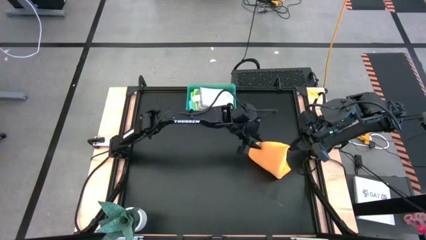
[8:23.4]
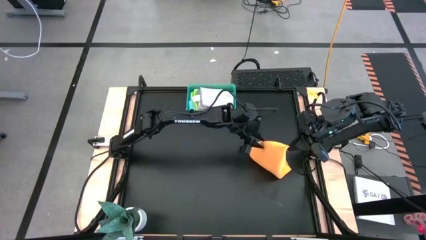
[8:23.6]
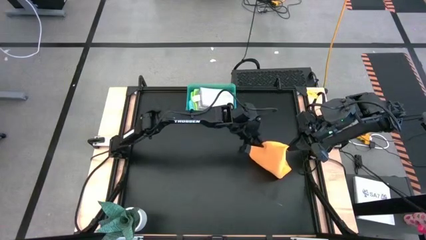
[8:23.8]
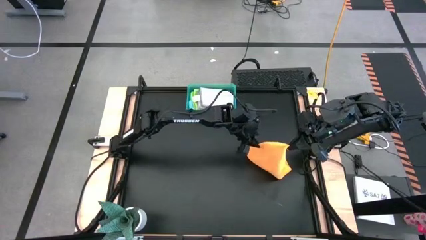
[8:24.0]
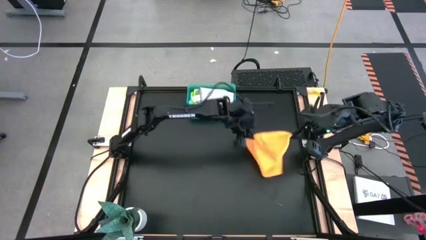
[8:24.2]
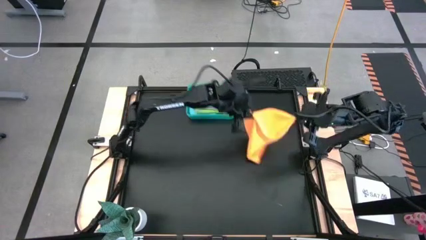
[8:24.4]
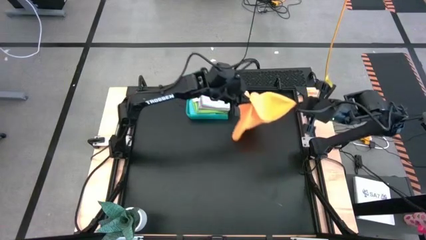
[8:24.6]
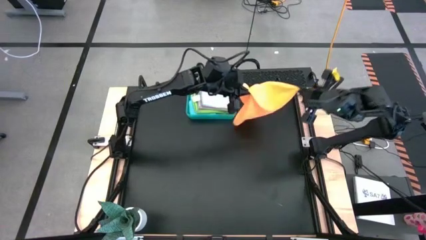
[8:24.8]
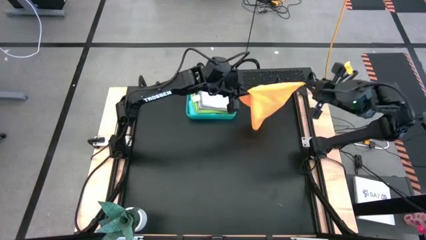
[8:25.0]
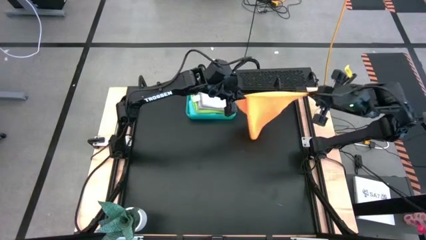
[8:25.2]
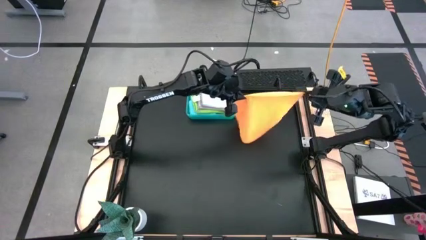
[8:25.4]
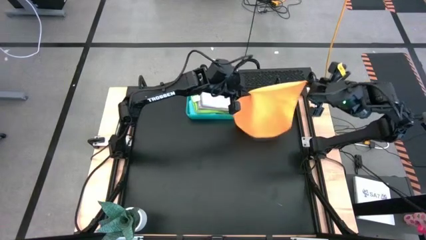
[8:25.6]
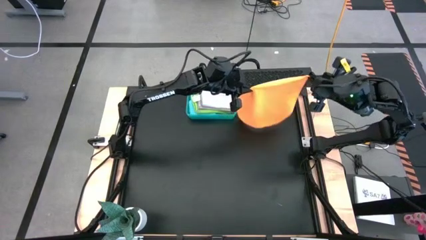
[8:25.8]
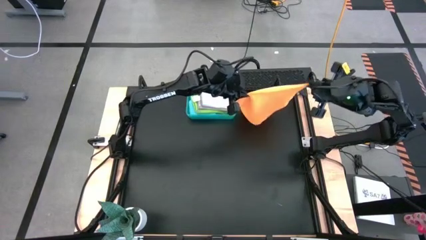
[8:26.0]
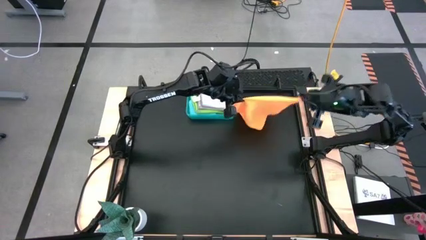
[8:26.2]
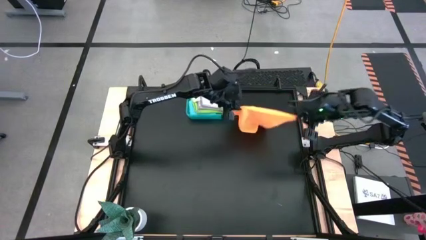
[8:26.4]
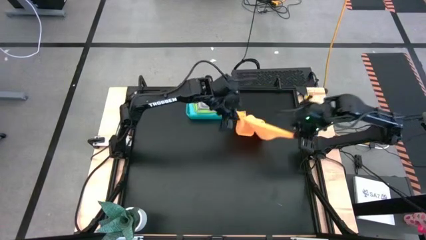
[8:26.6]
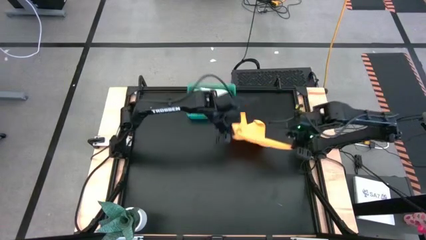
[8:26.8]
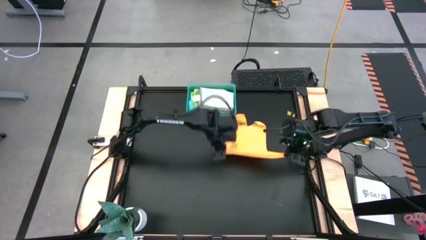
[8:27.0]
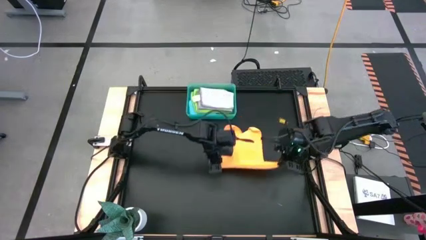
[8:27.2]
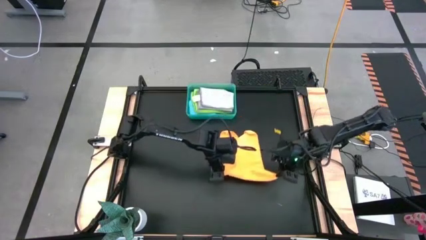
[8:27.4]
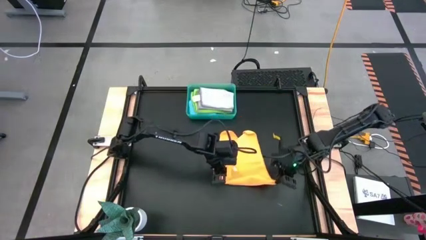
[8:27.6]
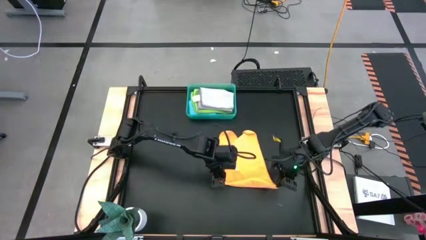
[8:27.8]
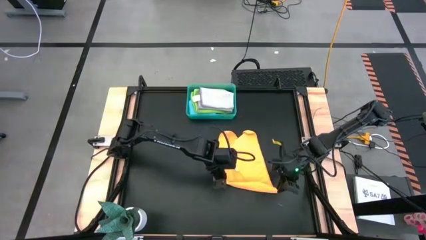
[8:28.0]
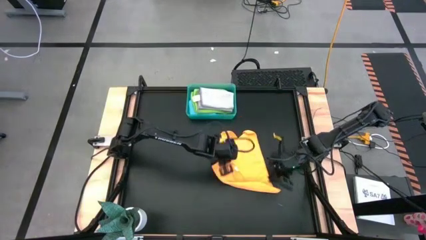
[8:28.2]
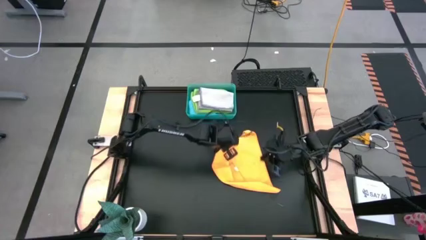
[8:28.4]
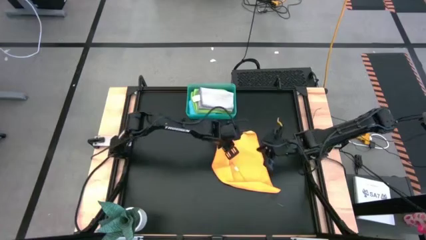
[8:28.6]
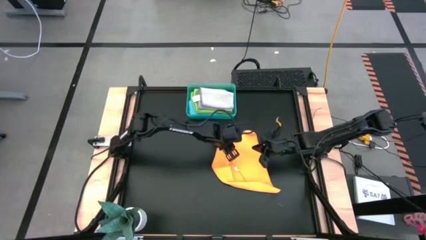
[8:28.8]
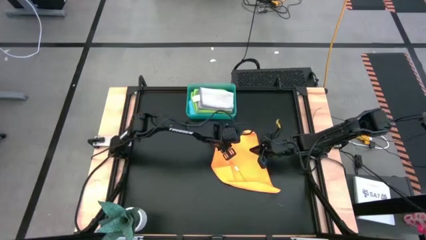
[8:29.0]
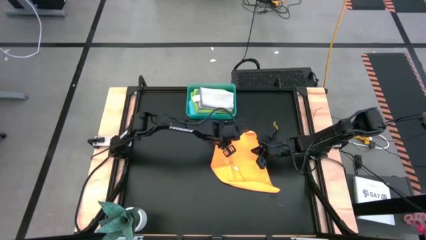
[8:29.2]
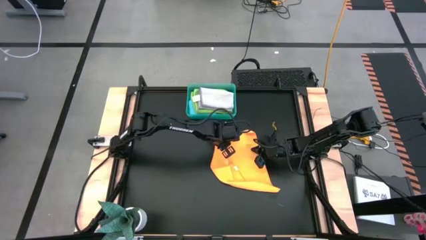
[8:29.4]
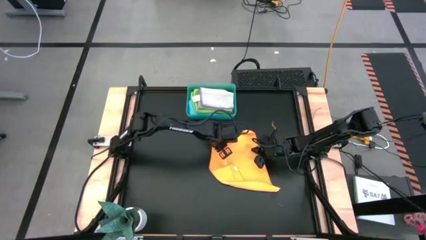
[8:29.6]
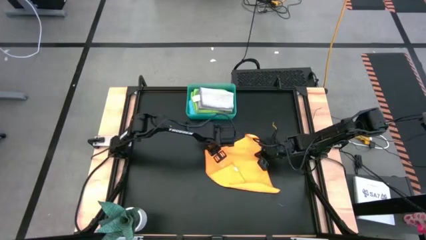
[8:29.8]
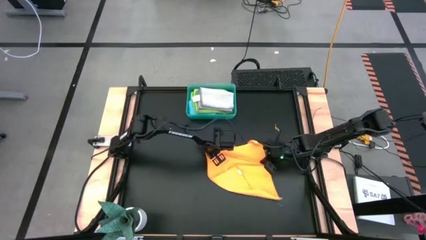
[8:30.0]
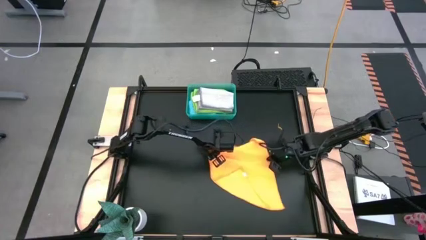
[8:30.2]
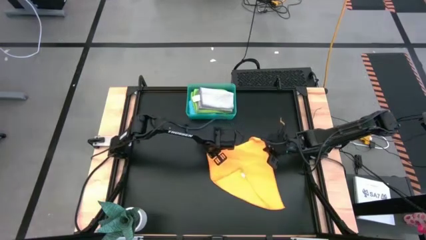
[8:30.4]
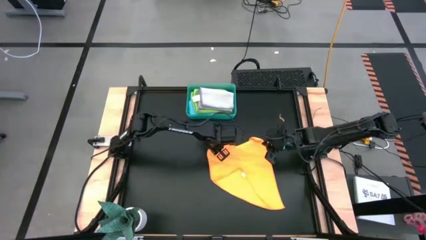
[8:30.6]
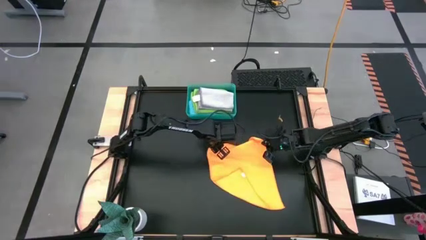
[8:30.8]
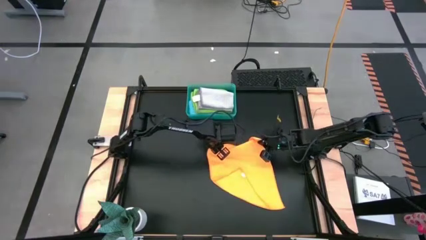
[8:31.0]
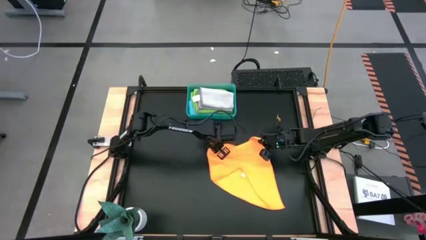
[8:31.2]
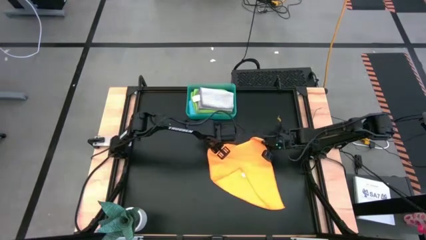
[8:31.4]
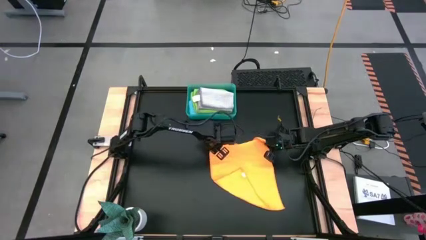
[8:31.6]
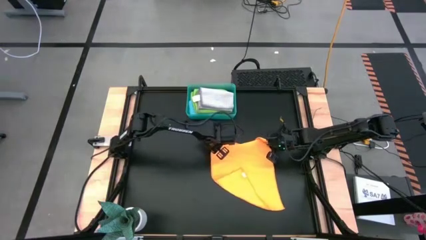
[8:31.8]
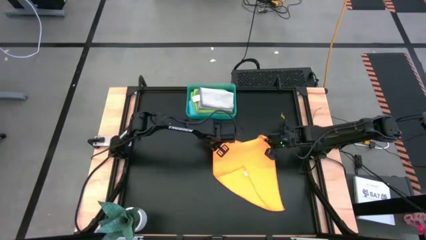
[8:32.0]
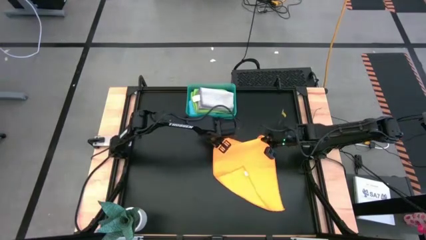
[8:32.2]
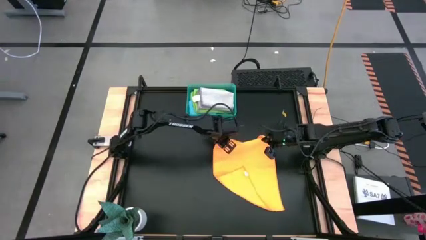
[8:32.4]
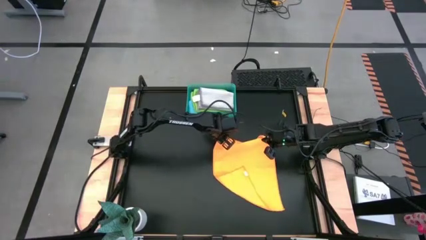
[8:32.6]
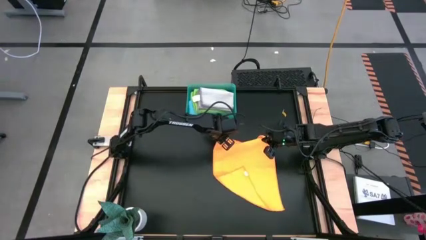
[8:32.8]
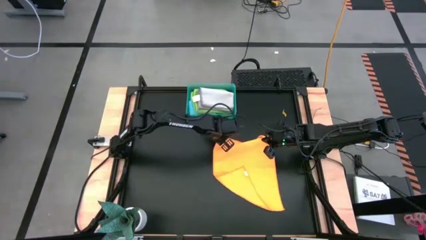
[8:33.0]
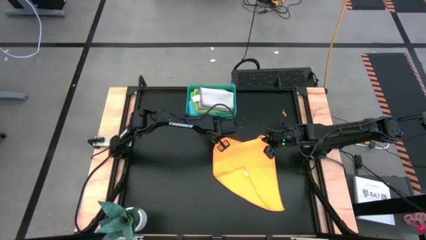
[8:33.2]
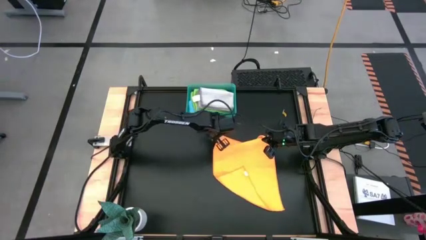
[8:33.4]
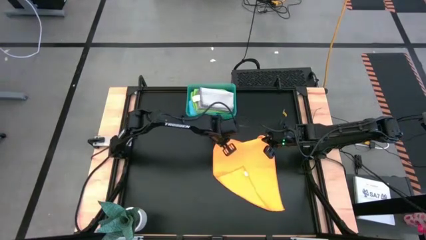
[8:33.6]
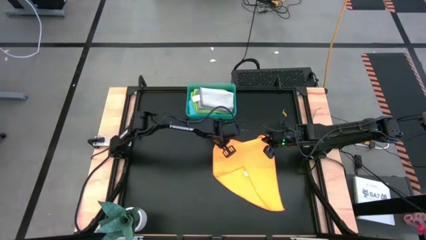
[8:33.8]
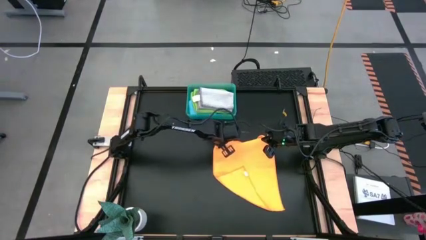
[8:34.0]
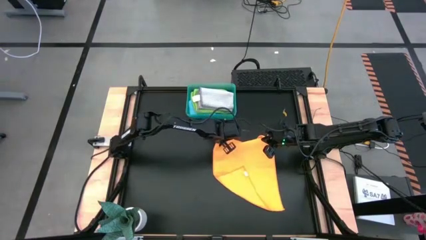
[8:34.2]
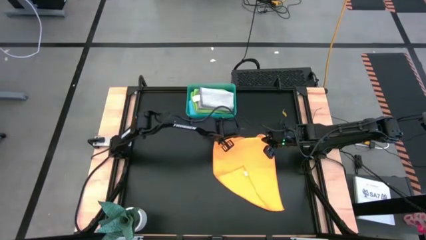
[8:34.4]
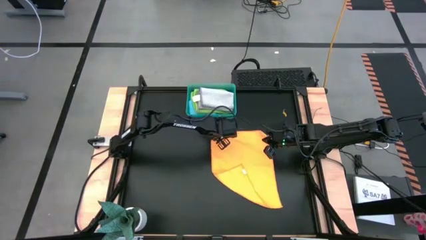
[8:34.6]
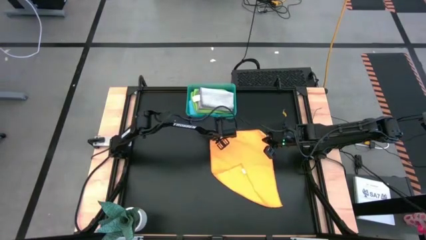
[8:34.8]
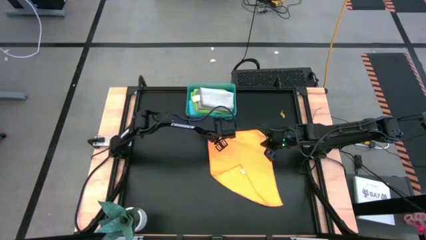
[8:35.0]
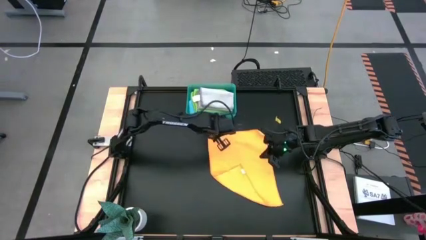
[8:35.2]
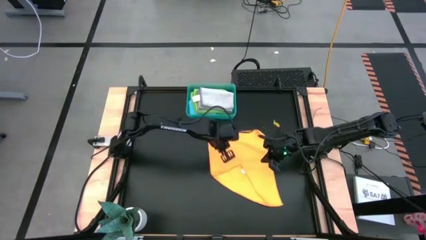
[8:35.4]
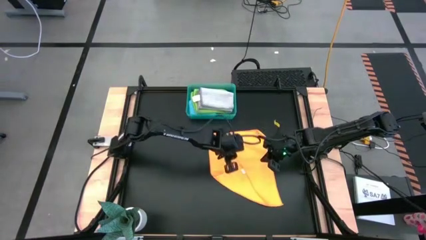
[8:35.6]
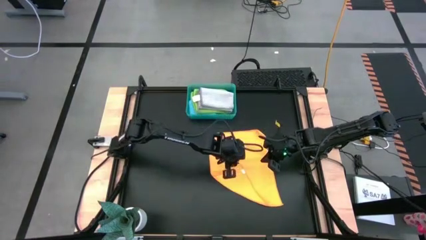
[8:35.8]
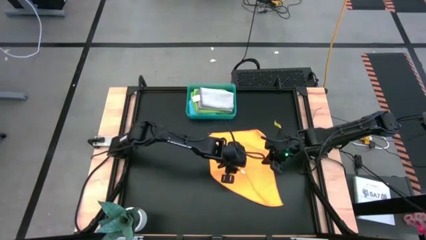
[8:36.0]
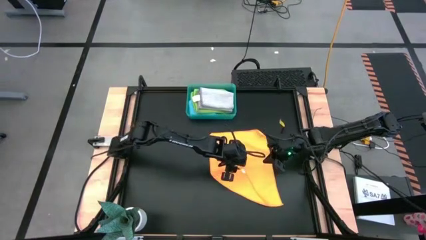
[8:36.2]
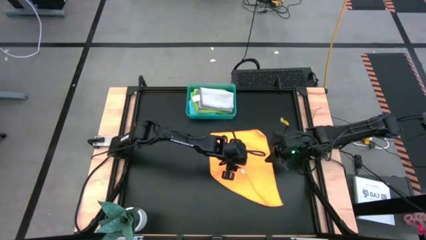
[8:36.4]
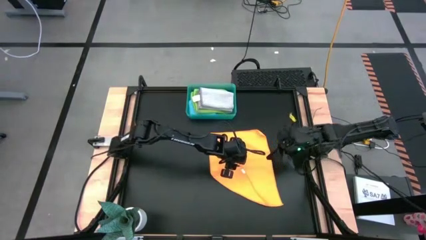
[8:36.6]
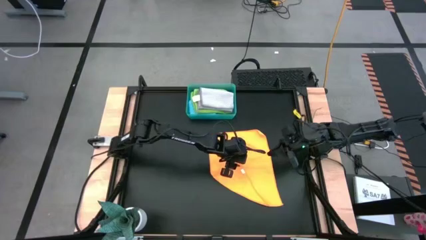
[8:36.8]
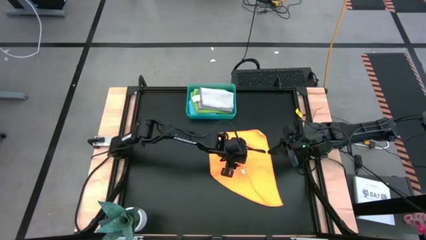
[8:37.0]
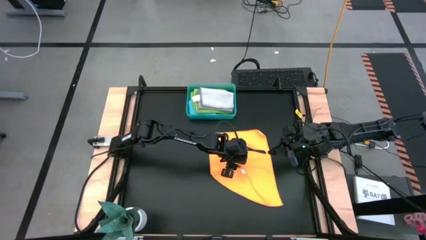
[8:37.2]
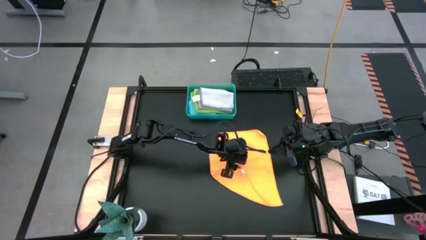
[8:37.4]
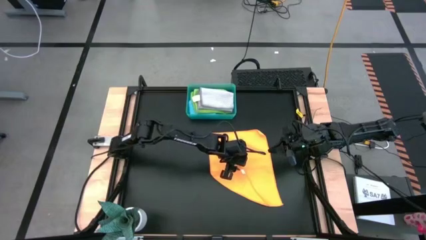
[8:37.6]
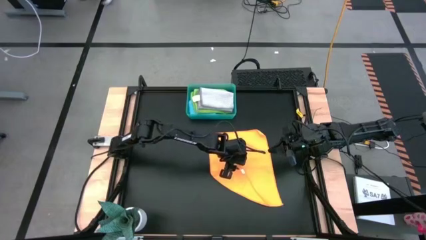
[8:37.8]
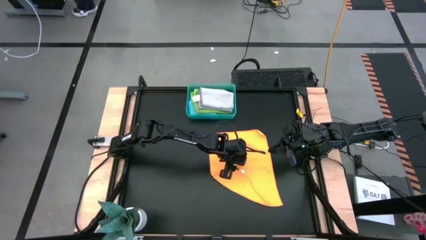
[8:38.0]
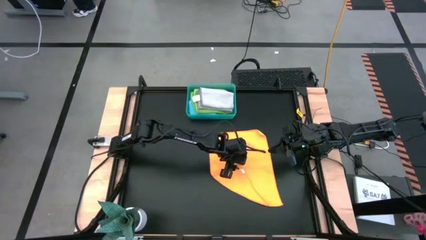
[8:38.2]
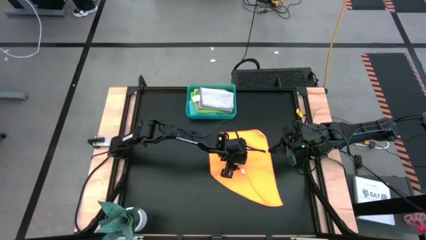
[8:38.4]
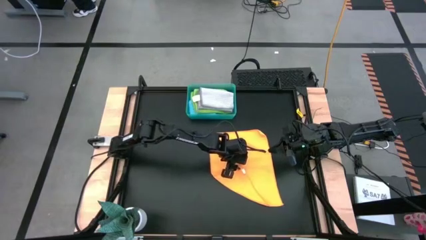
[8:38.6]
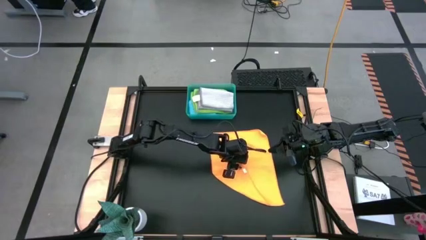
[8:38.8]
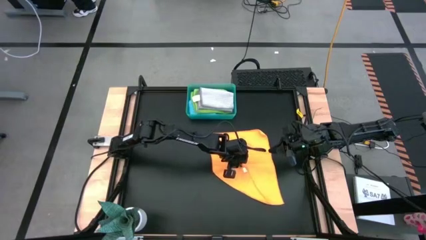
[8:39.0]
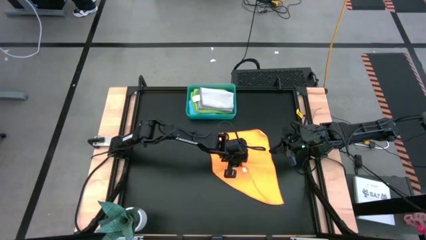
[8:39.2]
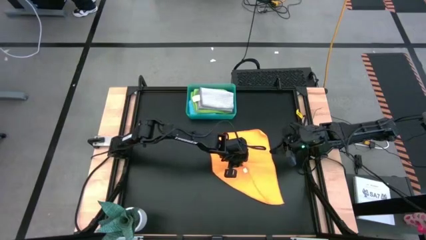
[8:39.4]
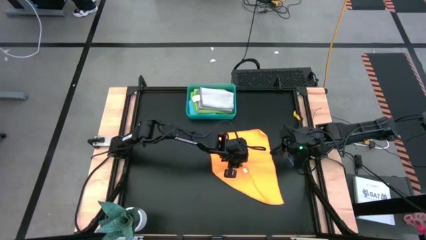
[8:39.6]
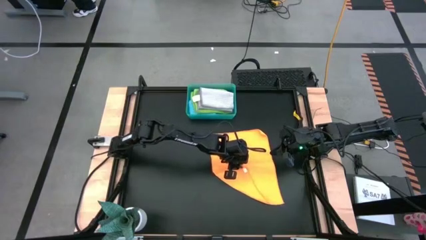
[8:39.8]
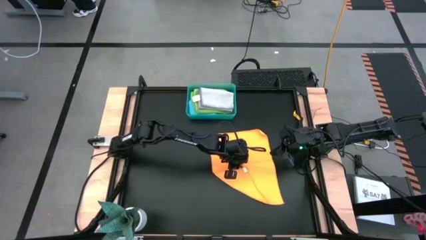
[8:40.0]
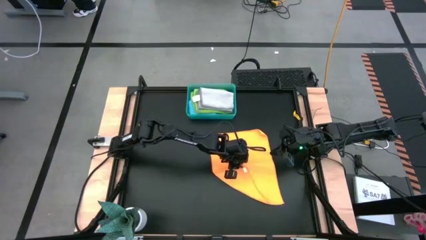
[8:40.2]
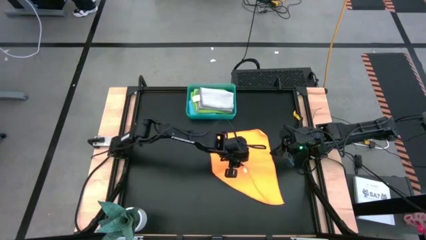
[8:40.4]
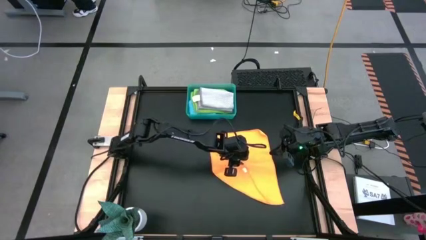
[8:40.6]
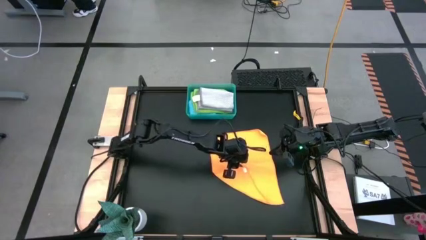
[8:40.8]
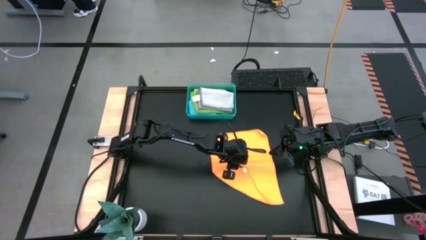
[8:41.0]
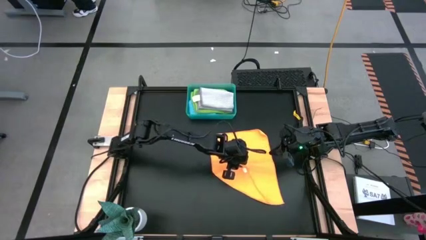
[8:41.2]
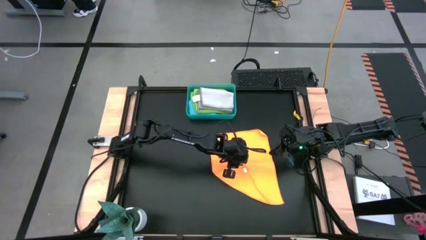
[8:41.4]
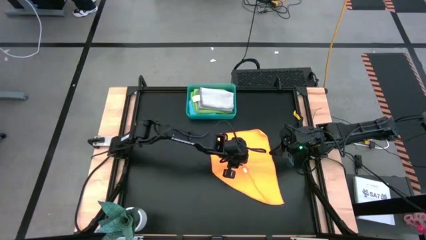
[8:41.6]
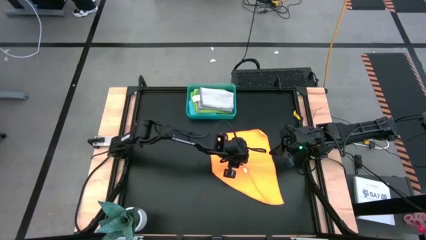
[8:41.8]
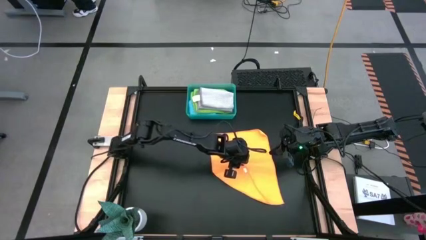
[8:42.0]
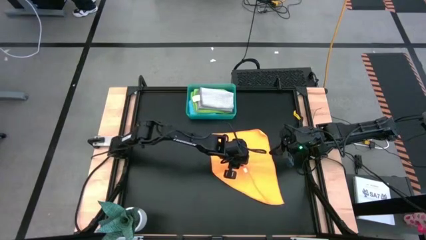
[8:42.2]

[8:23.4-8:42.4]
Task: Fold microfiber towels
Fold the orange microfiber towel
